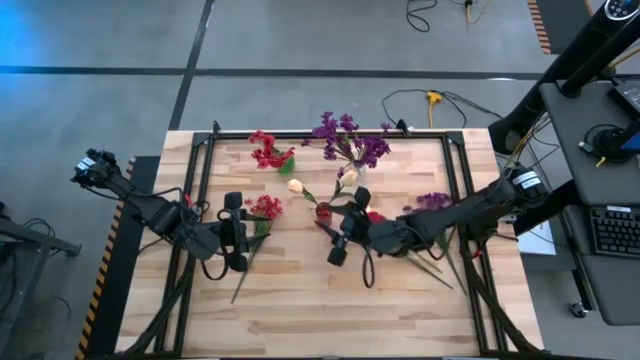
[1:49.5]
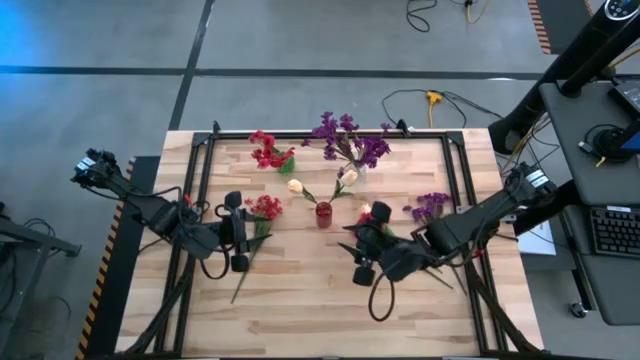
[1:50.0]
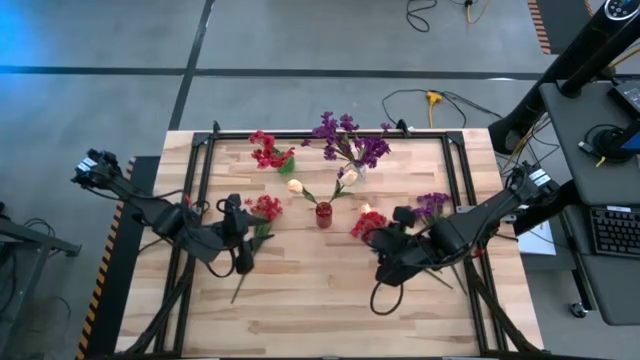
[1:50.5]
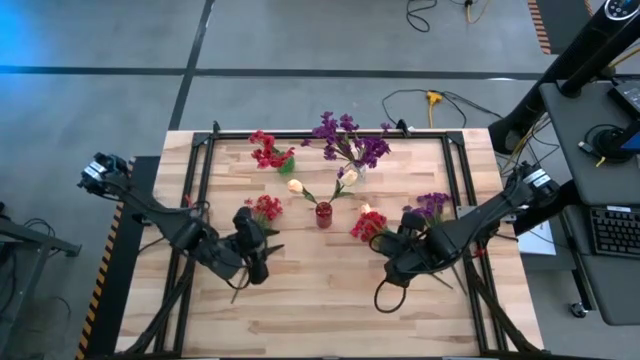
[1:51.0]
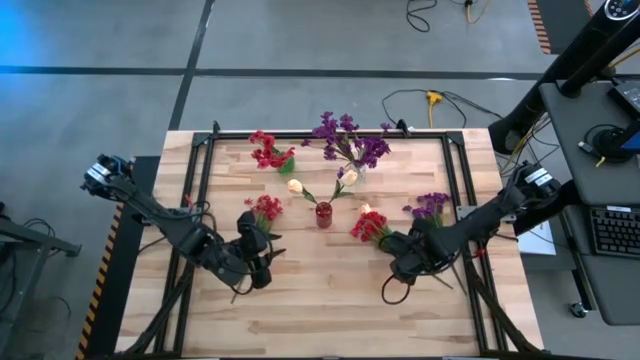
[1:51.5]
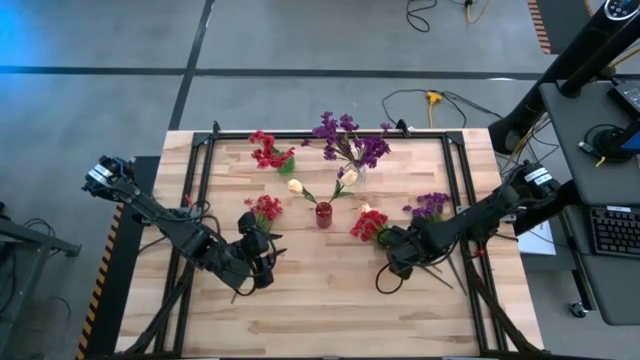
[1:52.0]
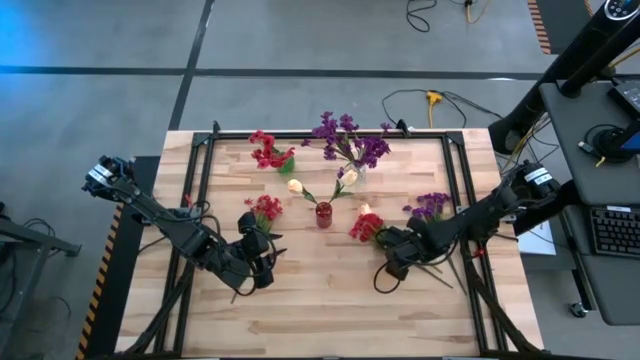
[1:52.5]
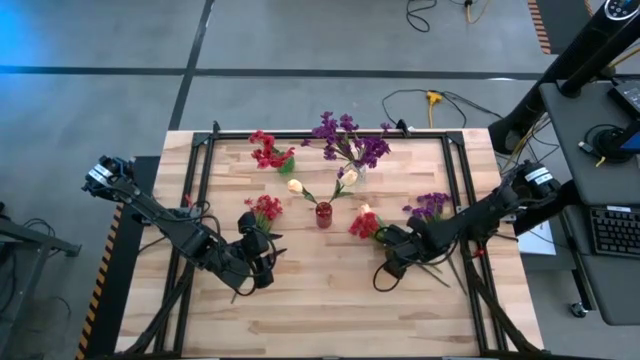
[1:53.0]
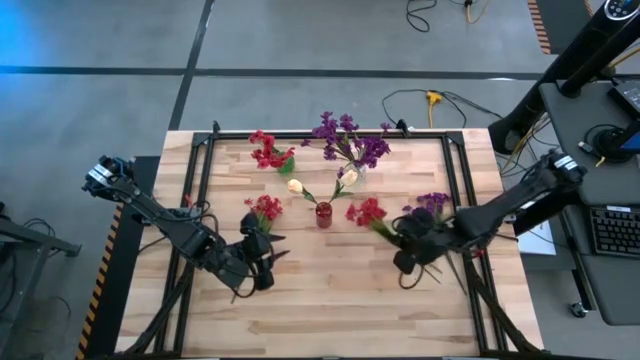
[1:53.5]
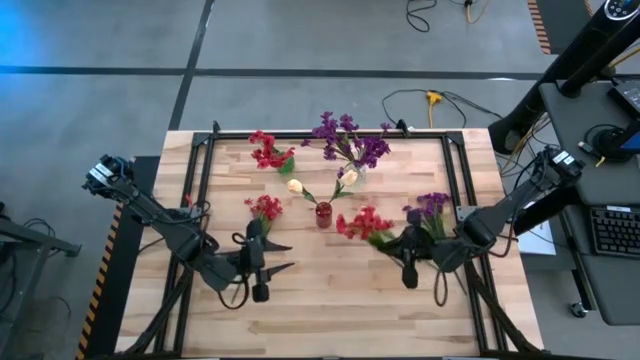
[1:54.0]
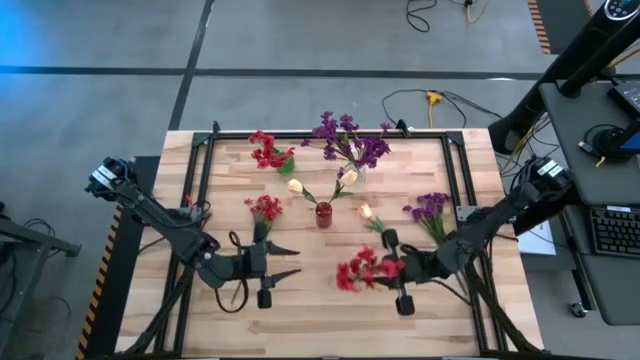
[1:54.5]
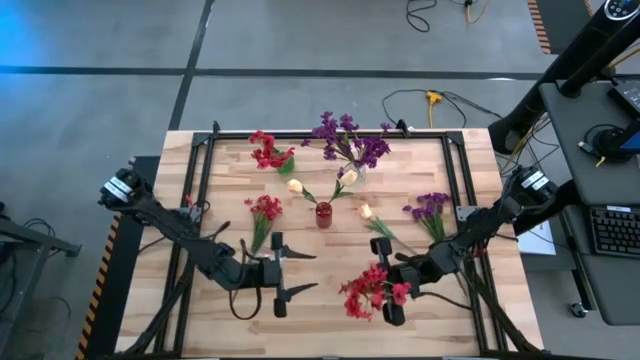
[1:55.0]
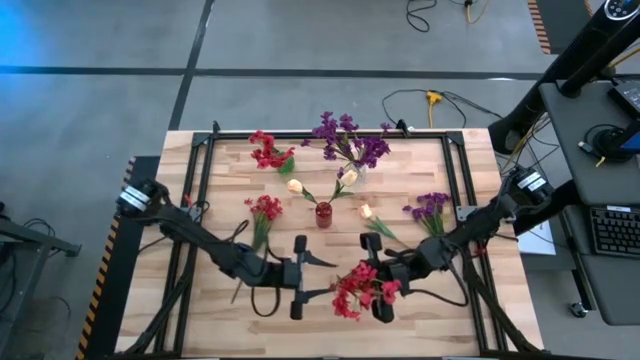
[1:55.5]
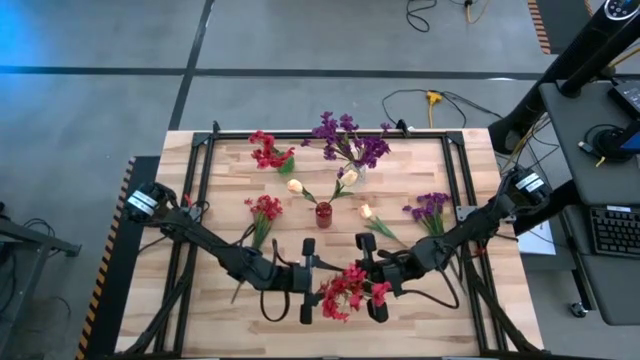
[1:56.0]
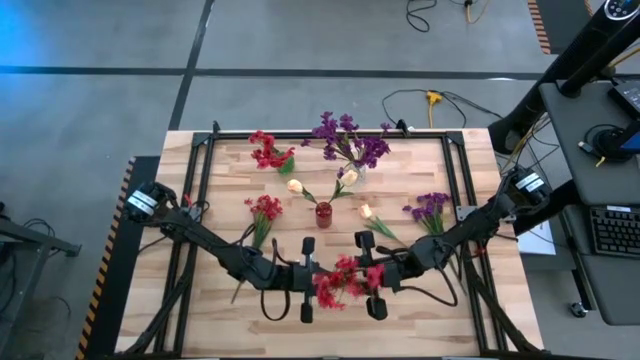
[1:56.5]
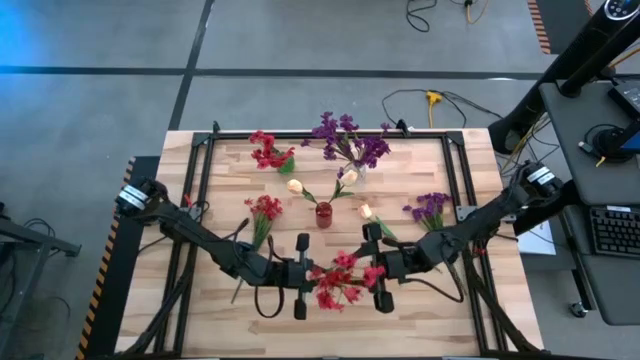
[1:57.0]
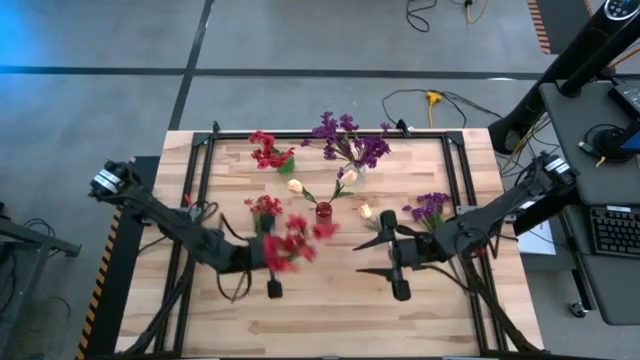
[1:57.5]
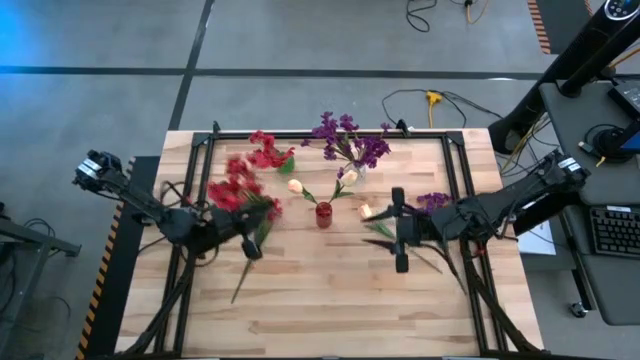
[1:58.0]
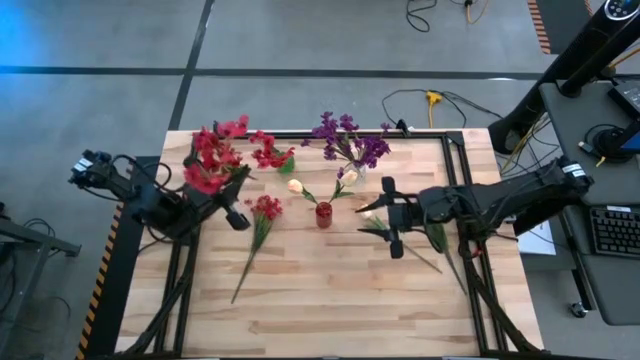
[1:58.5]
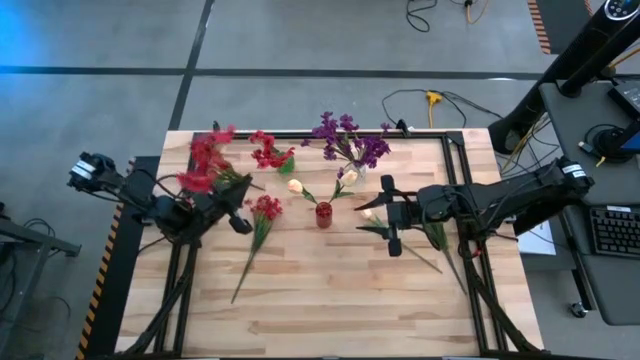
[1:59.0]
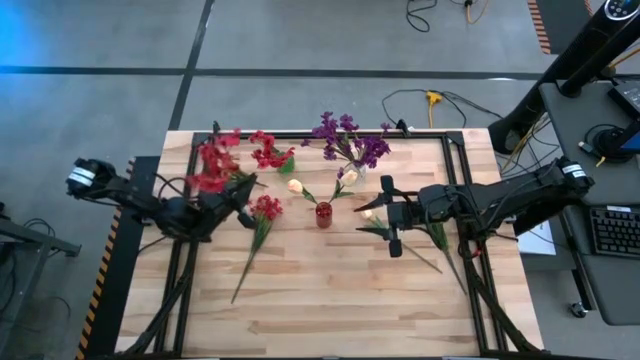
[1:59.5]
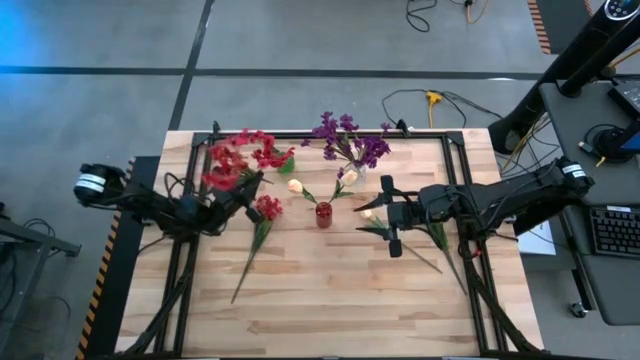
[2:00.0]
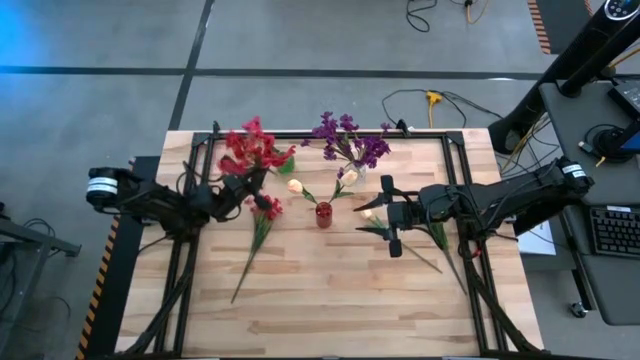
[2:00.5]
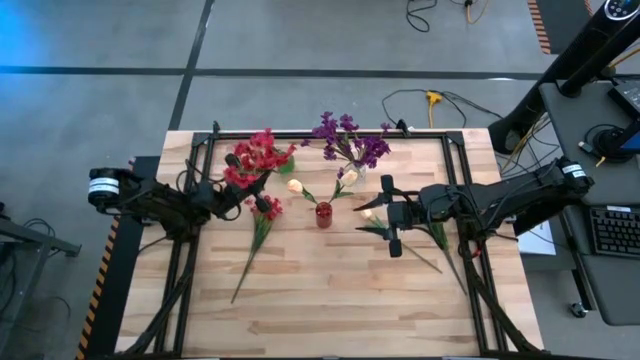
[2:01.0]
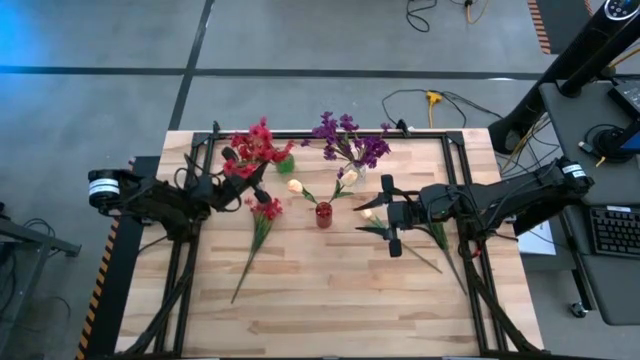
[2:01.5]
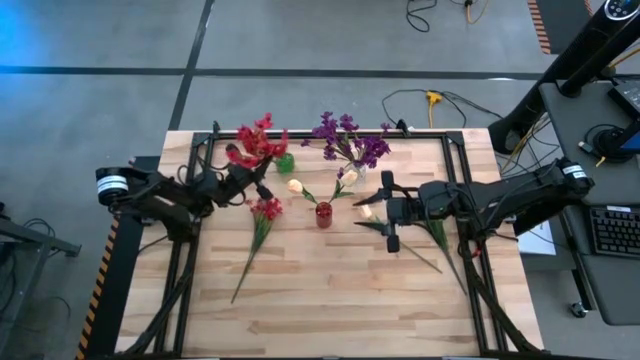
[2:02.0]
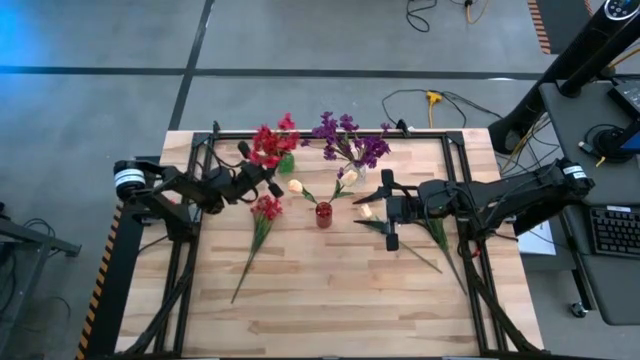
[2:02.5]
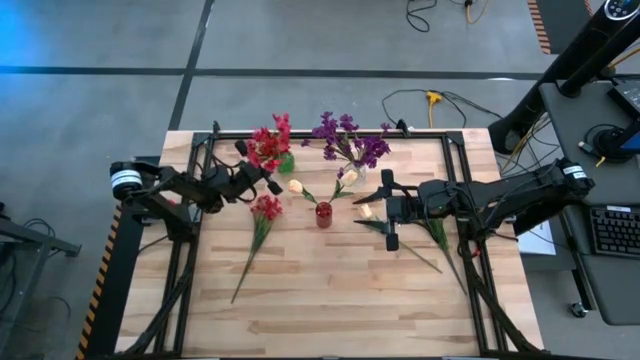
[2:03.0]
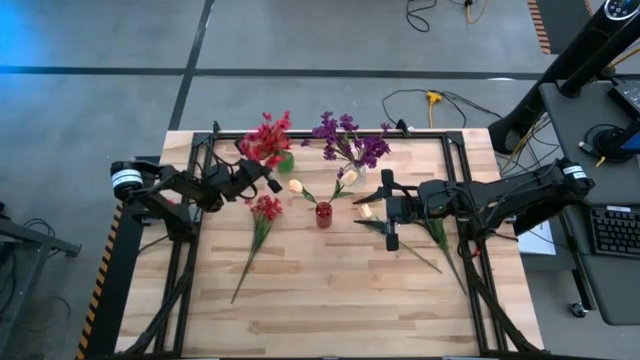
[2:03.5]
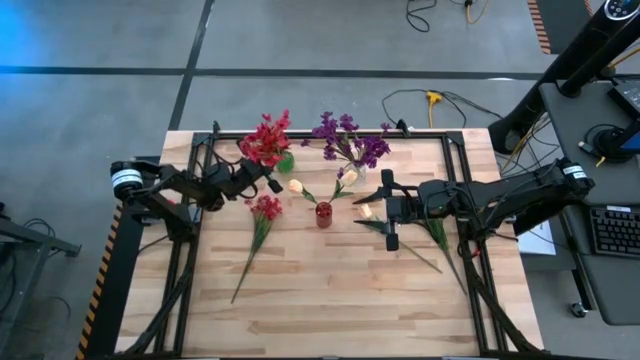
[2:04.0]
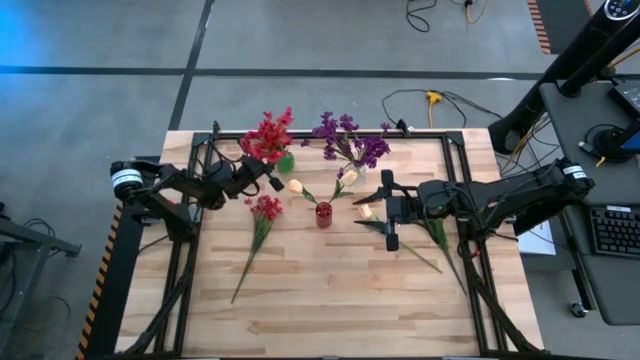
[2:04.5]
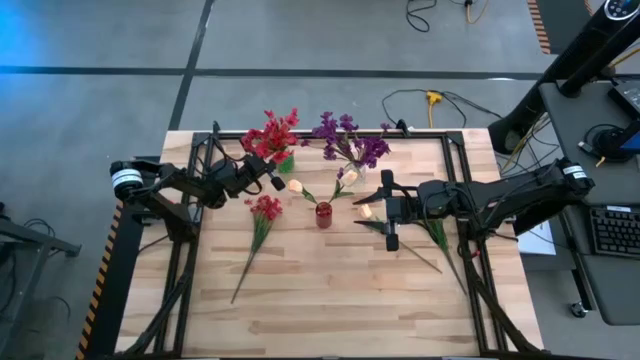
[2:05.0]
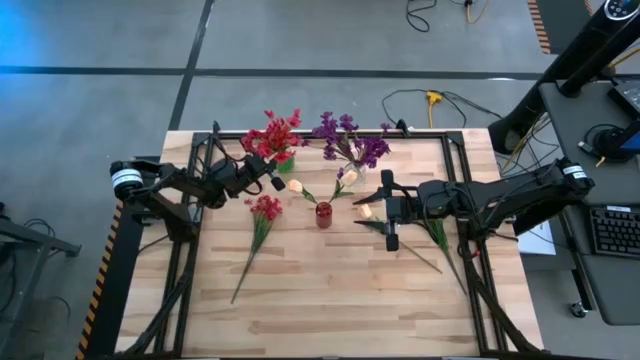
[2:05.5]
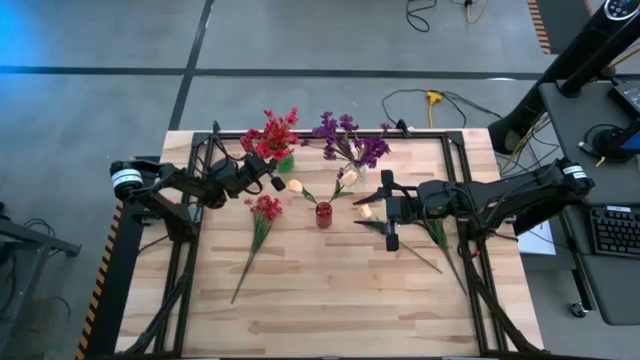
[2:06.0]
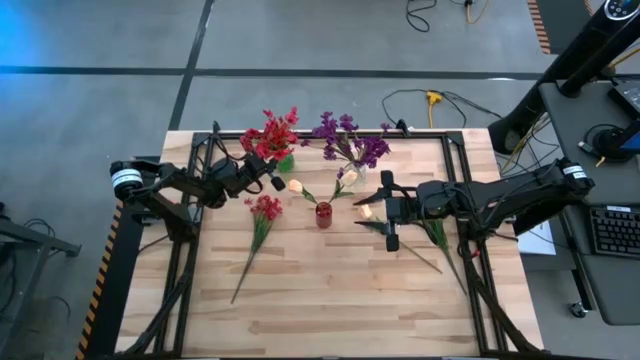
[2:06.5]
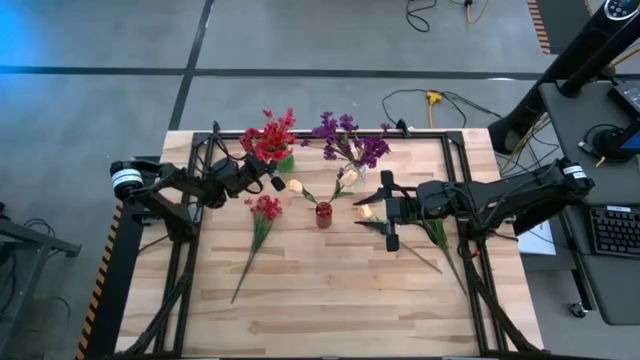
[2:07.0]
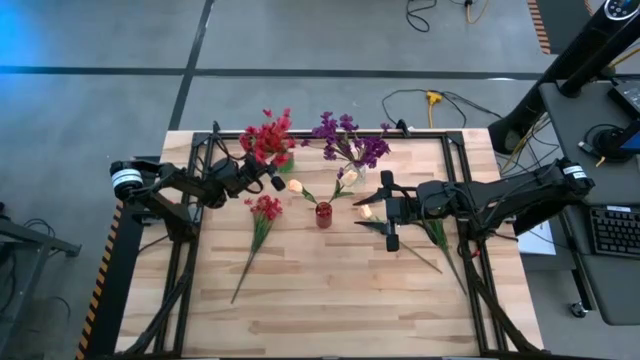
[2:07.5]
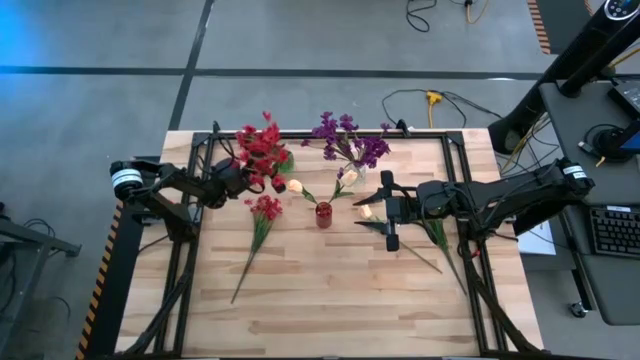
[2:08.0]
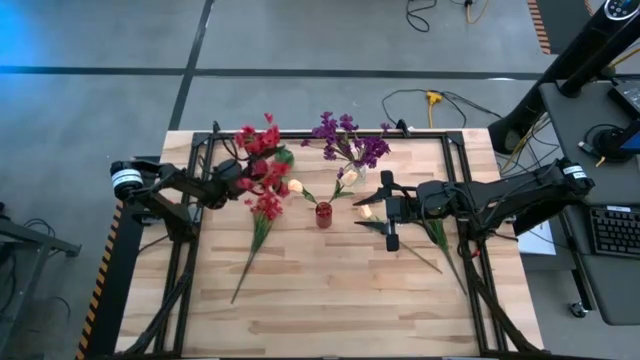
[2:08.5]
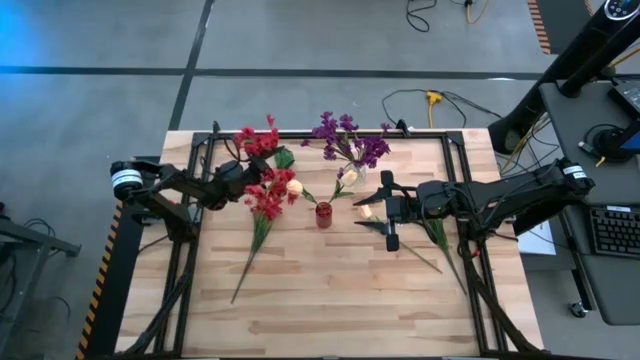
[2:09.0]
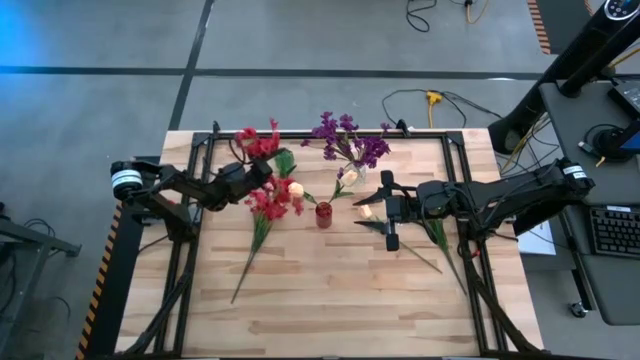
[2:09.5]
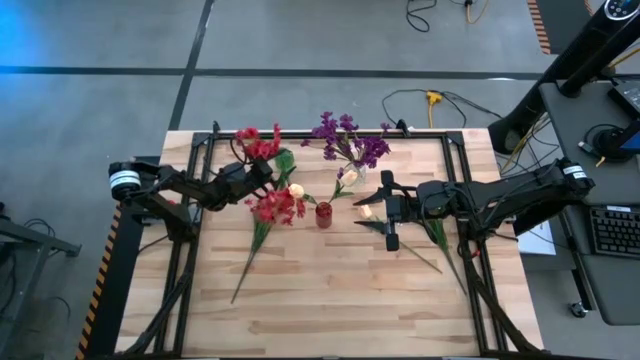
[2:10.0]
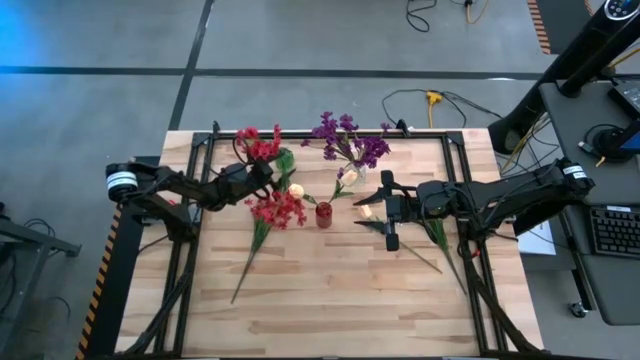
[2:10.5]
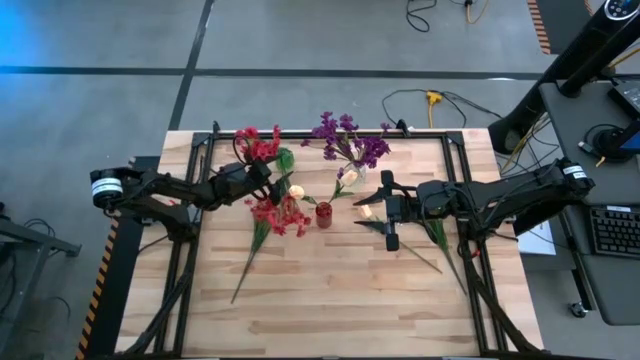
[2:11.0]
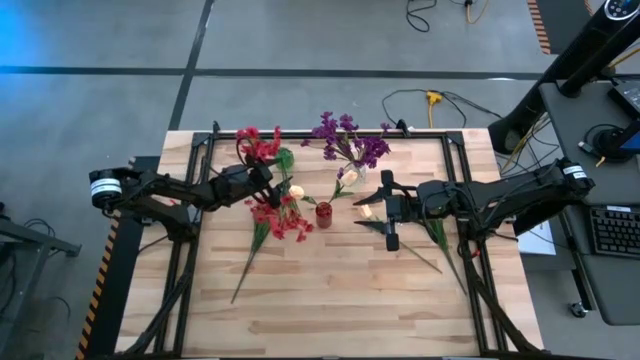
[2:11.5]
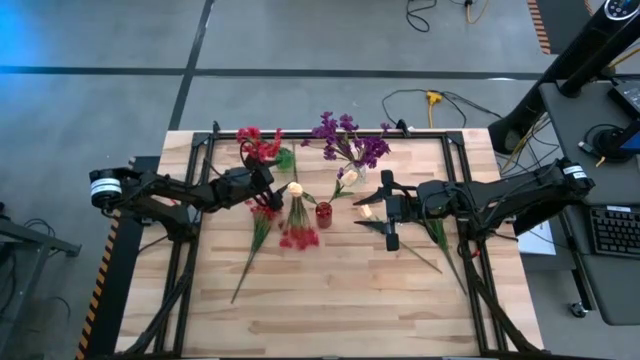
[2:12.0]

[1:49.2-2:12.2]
Task: Sort flowers into vase by color
Put the red flowers into the green vase
